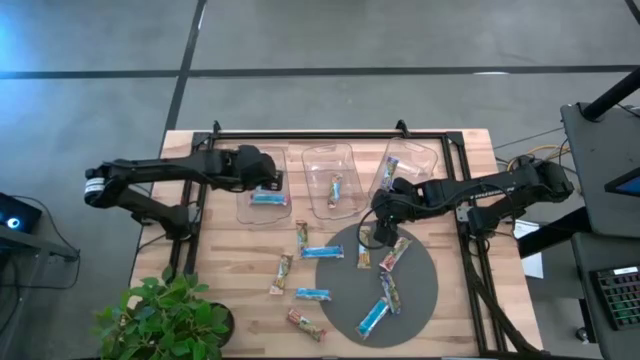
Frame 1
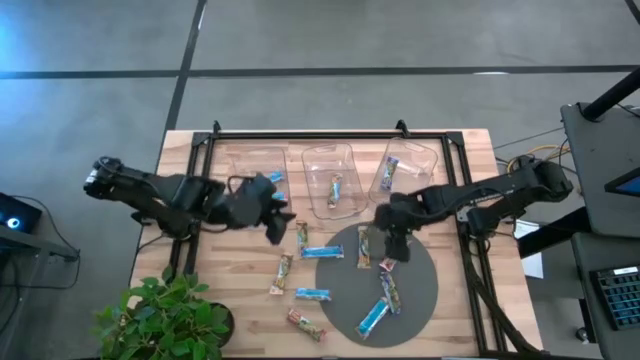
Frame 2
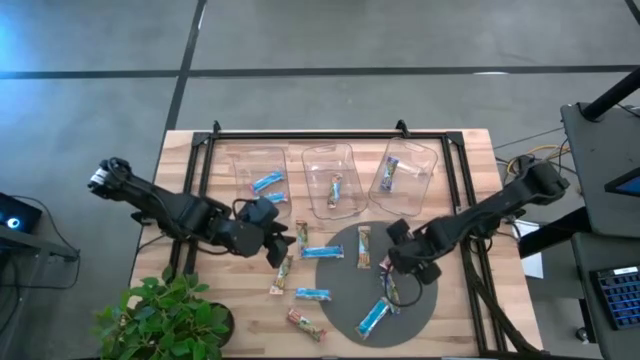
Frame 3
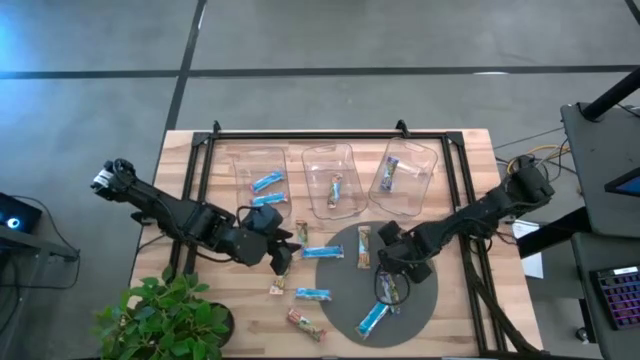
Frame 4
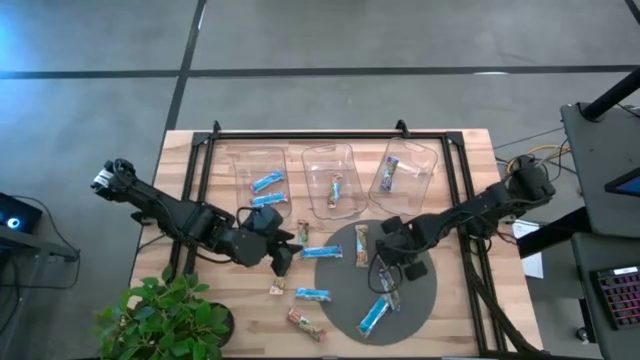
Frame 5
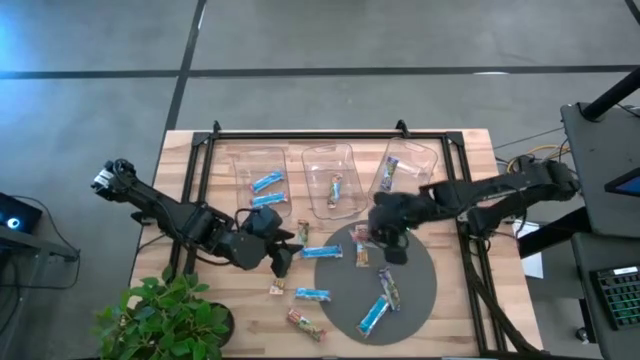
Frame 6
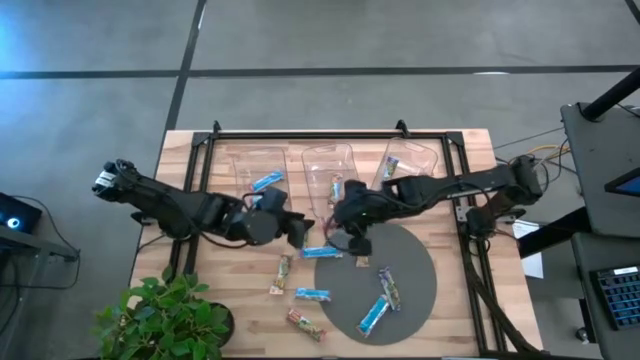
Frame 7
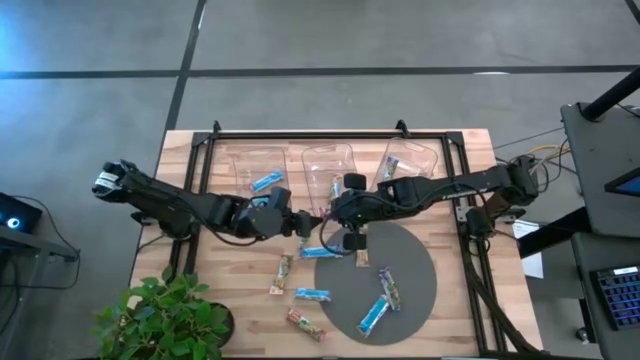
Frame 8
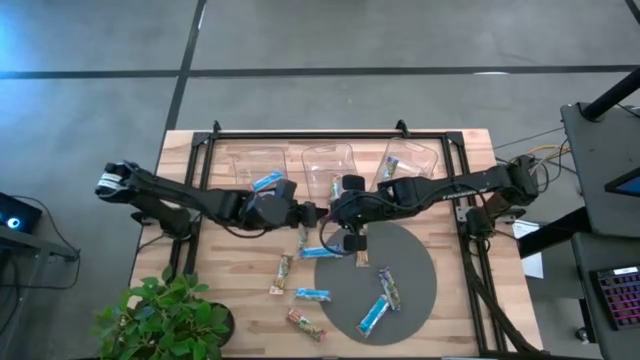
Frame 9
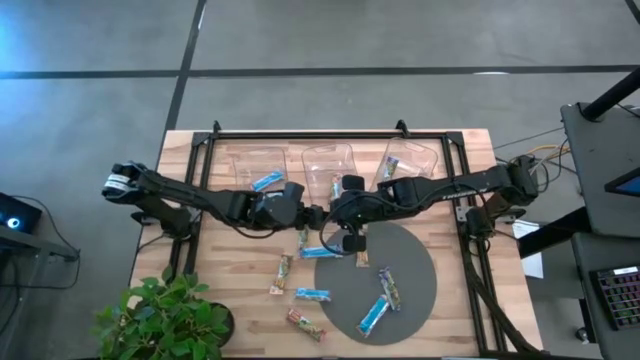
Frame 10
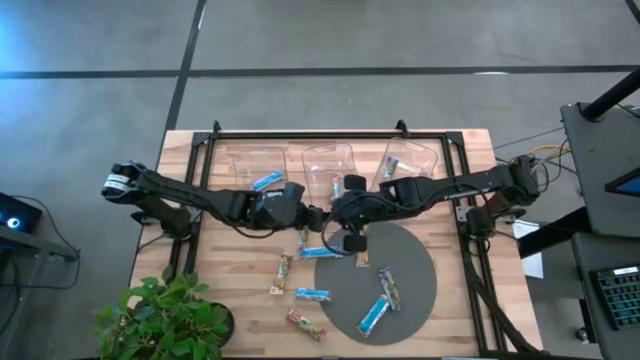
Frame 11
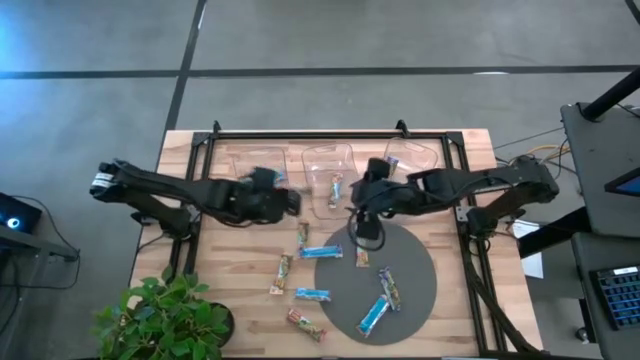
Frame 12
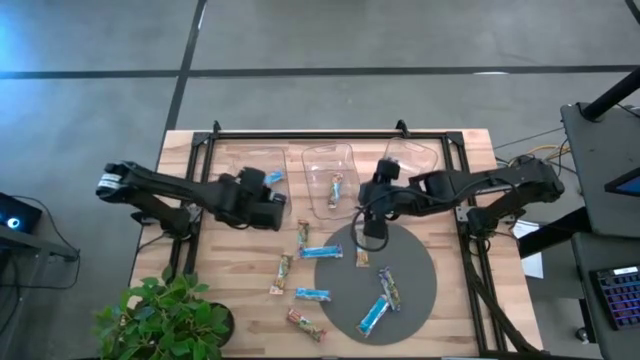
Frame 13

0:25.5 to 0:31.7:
Task: Pick and place Granola Bars by type
Put the top red granola bar into the left transparent bin

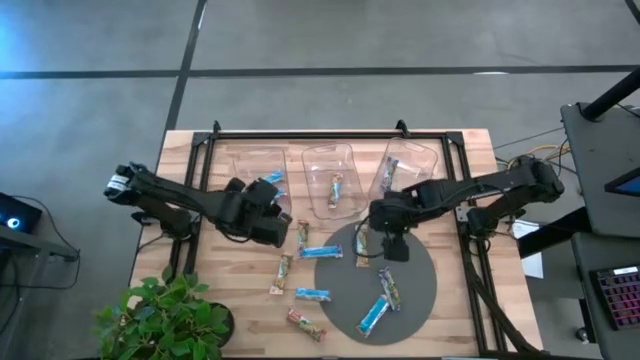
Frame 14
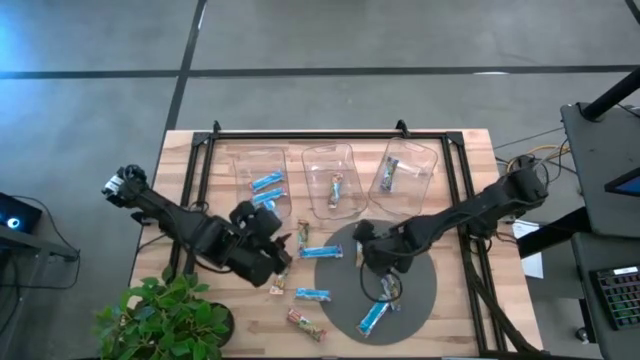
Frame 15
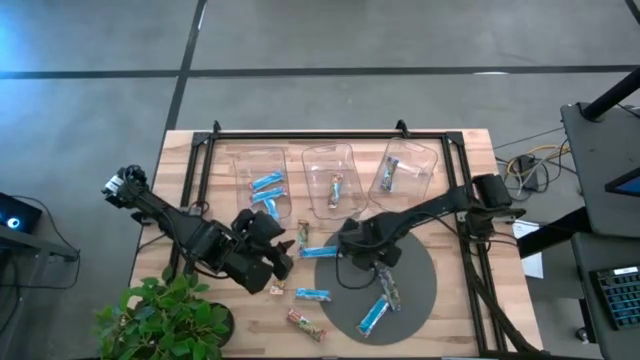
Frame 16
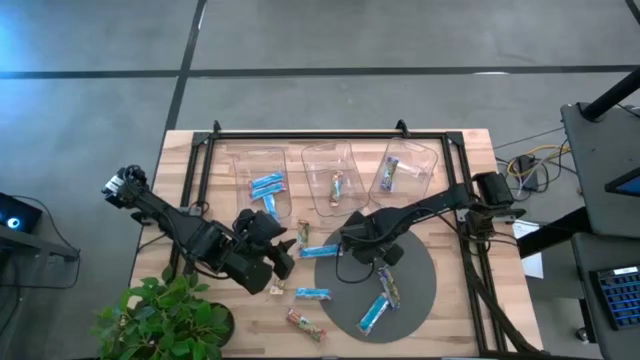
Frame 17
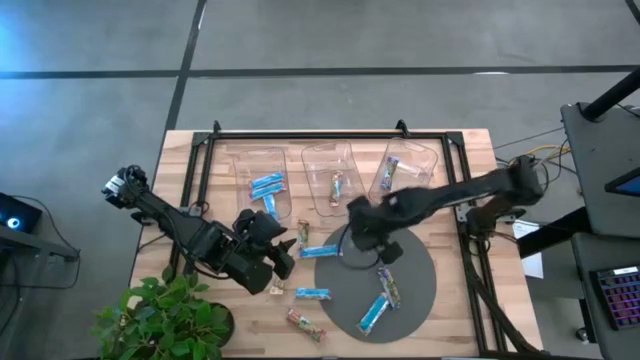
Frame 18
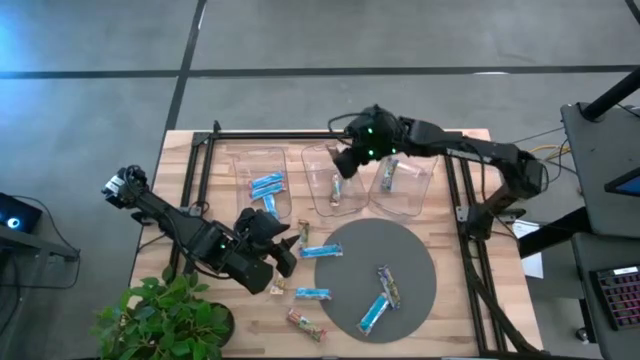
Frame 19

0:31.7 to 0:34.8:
Put the yellow granola bar into the middle transparent bin

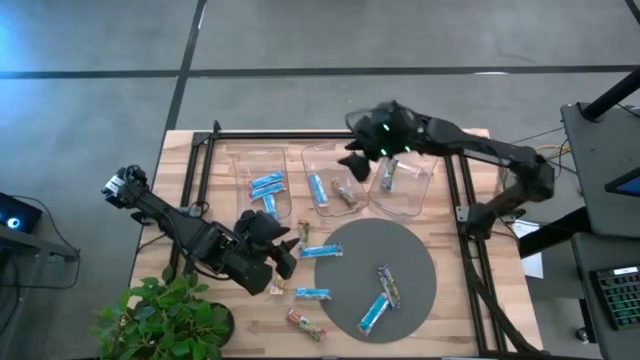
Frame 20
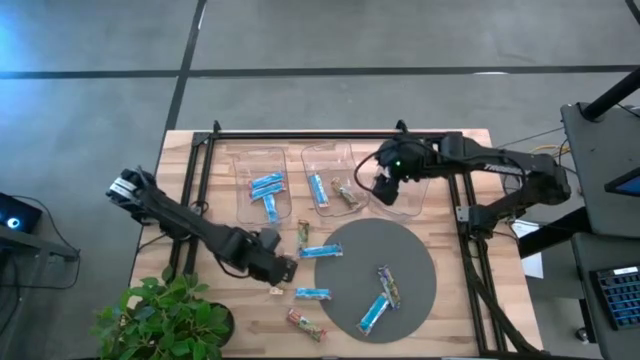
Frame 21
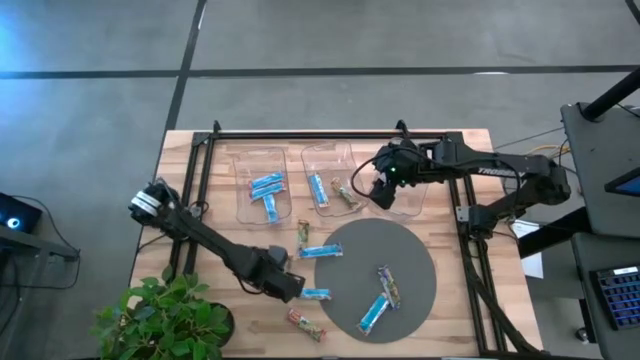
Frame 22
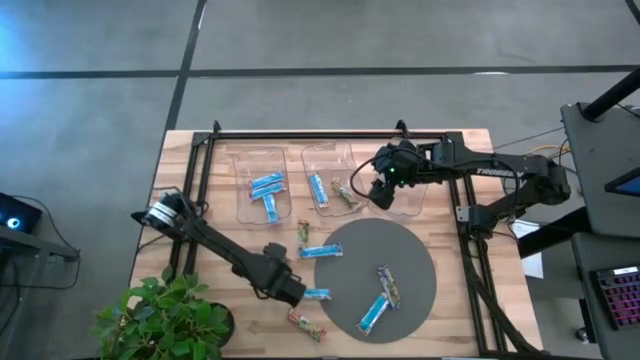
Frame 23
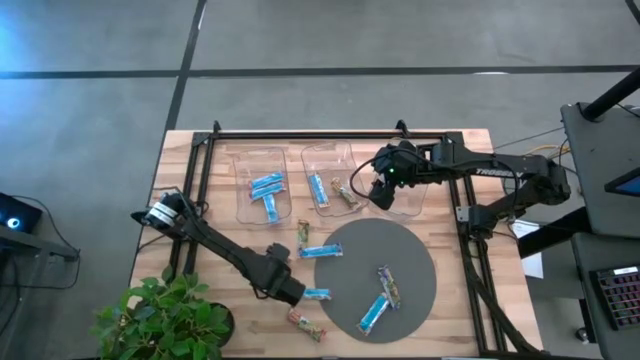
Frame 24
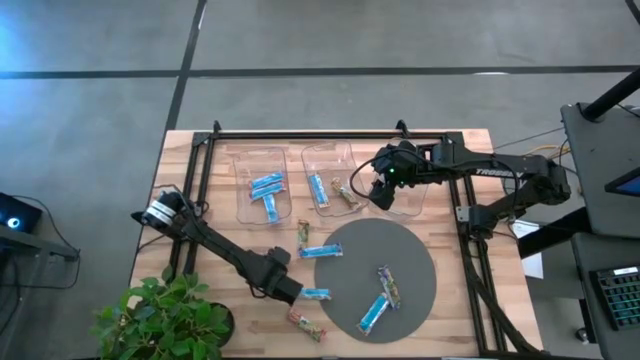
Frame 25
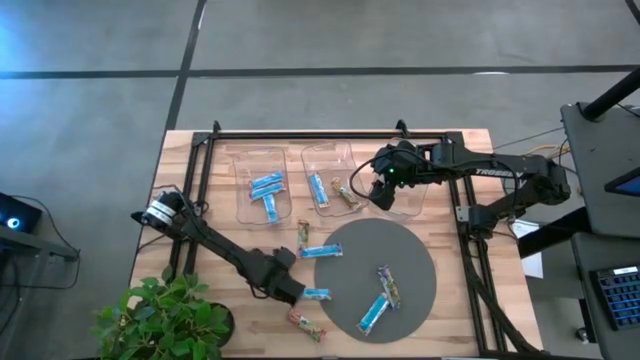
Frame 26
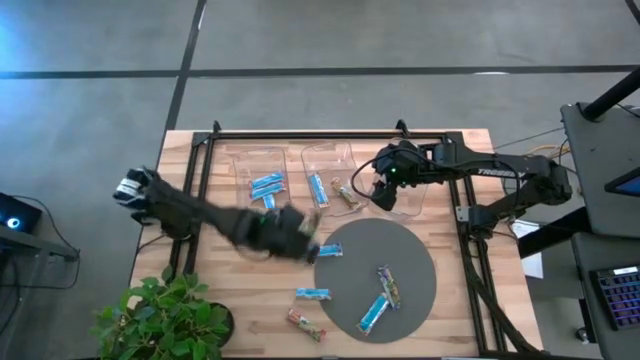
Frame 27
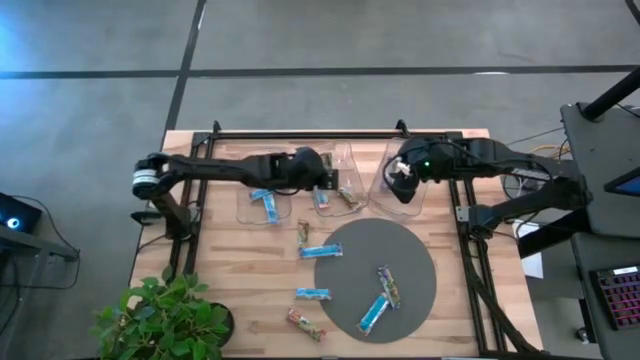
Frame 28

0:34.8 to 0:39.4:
Put the middle yellow granola bar into the middle transparent bin

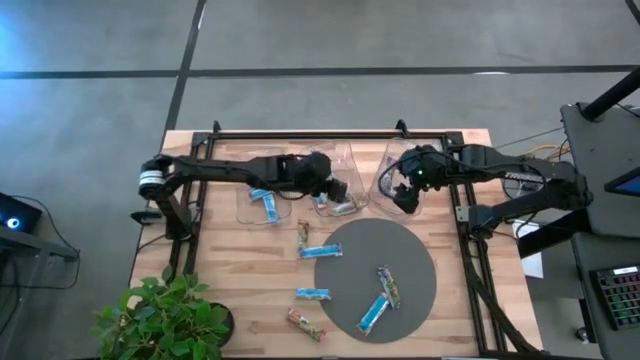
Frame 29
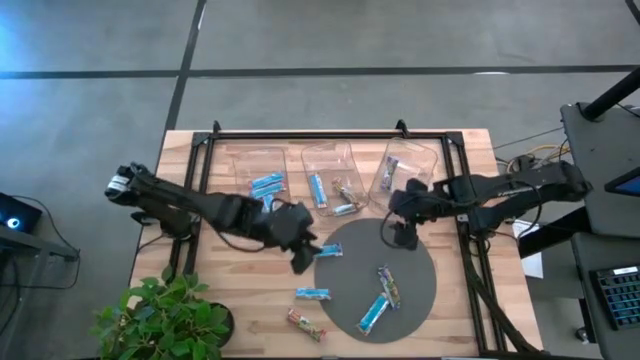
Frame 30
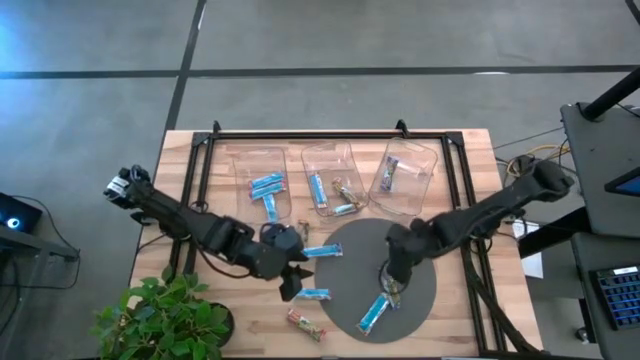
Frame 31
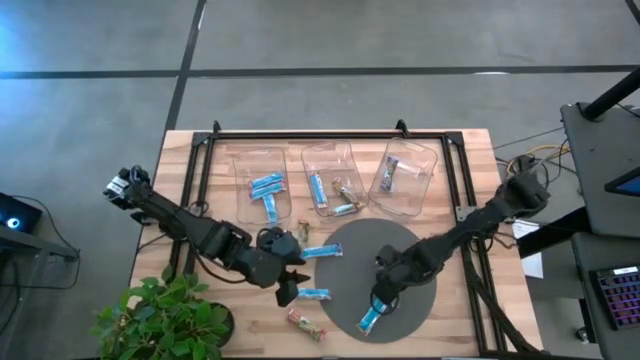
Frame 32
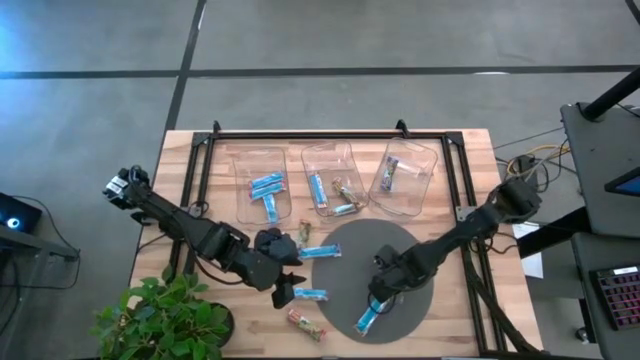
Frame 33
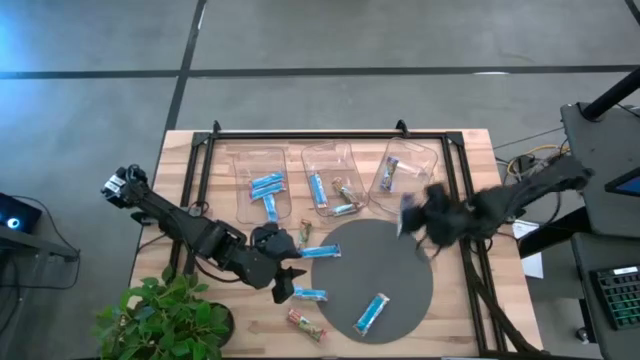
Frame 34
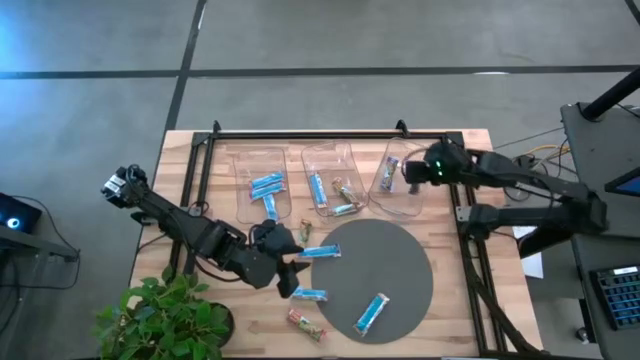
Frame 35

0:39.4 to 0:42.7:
Put the right blue granola bar into the right transparent bin

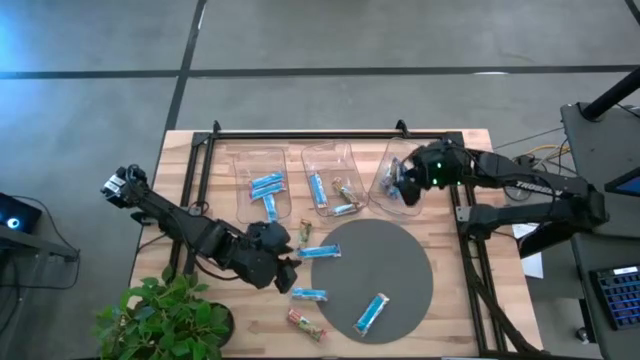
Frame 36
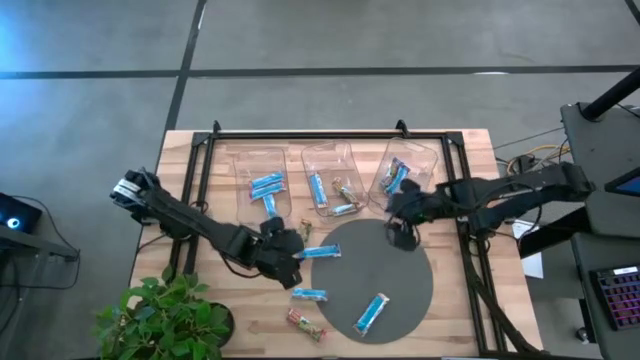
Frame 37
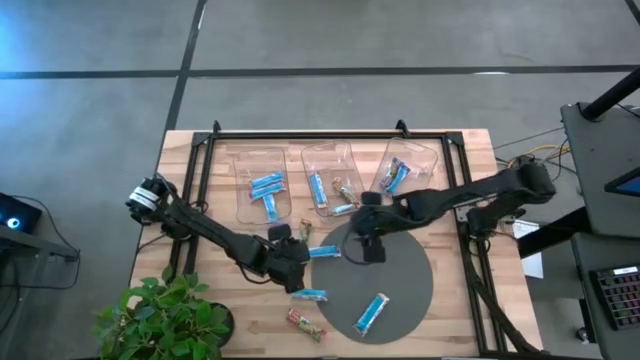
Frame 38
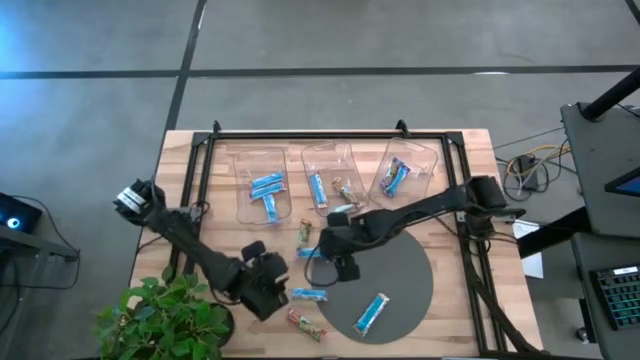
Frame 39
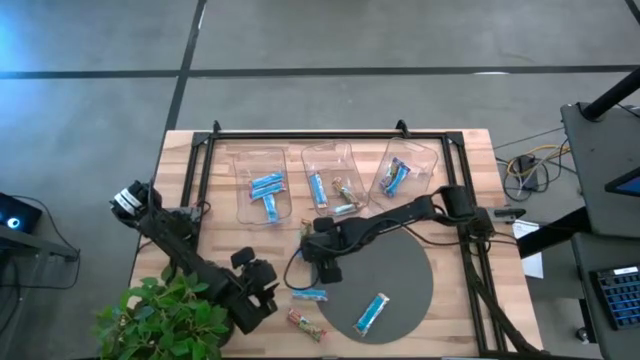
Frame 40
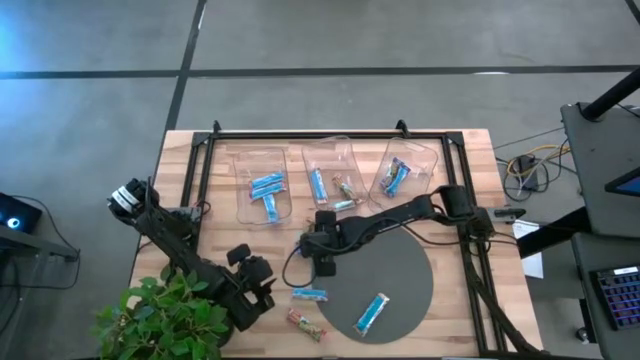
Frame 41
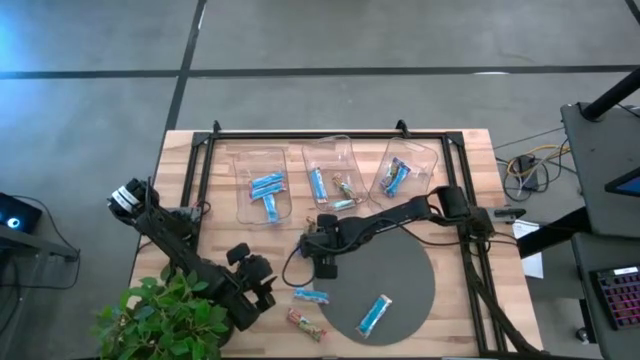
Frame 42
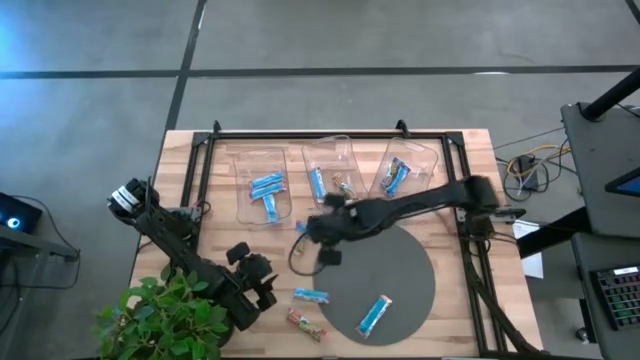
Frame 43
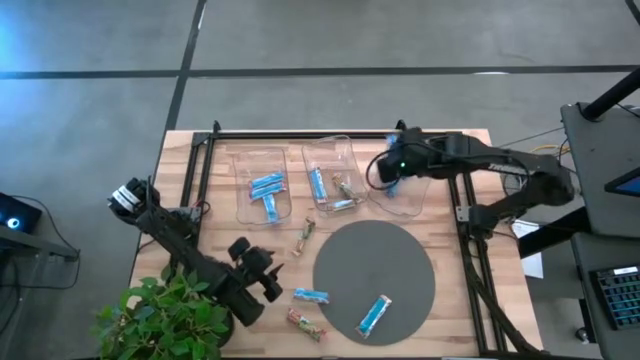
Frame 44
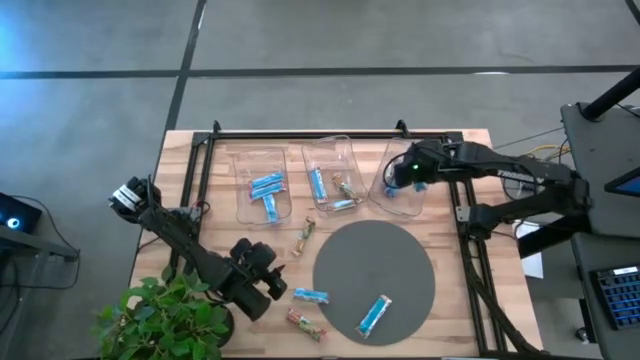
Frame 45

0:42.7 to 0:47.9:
Put the blue granola bar into the right transparent bin
